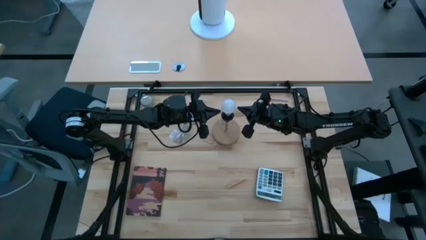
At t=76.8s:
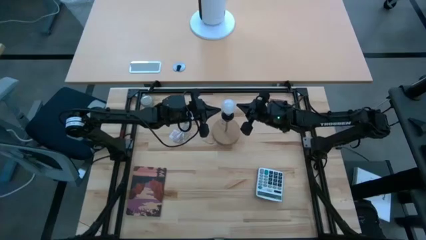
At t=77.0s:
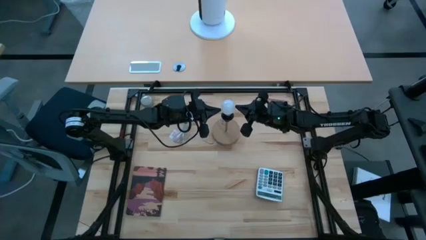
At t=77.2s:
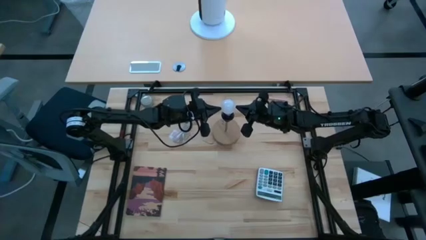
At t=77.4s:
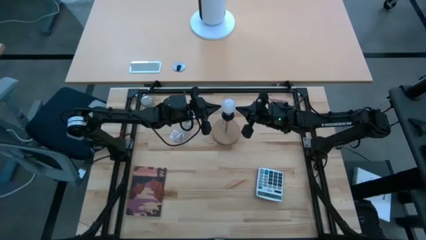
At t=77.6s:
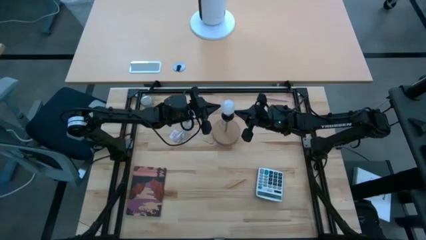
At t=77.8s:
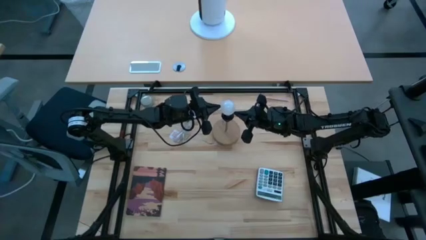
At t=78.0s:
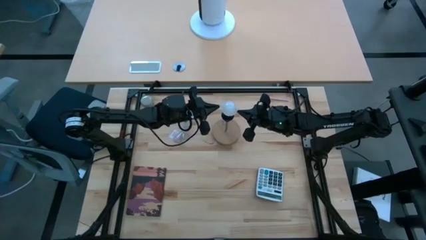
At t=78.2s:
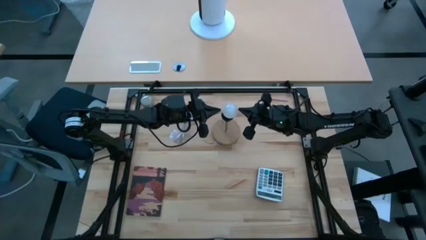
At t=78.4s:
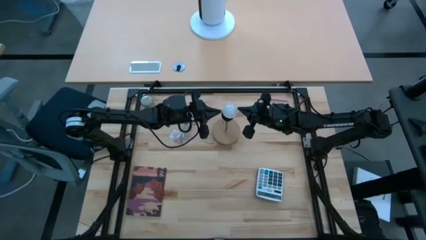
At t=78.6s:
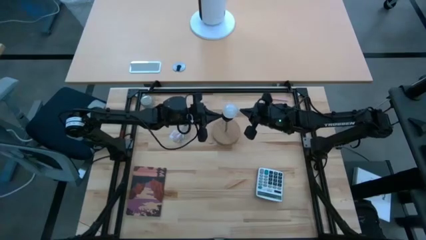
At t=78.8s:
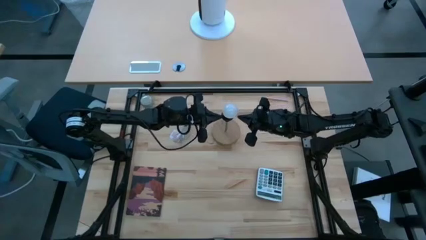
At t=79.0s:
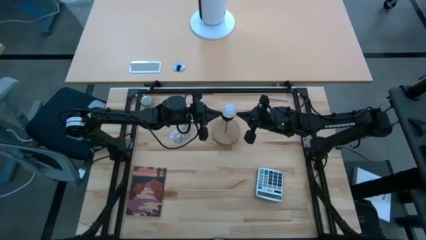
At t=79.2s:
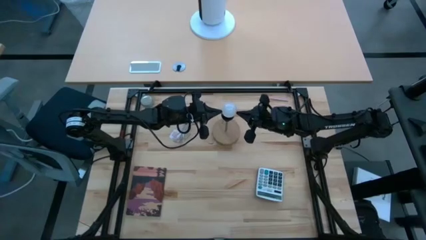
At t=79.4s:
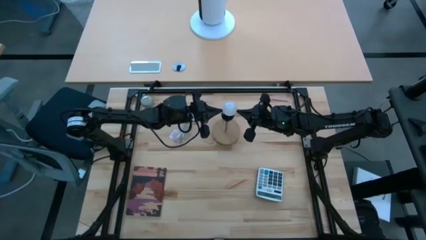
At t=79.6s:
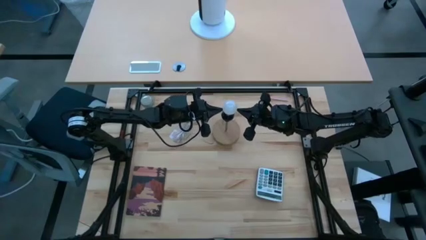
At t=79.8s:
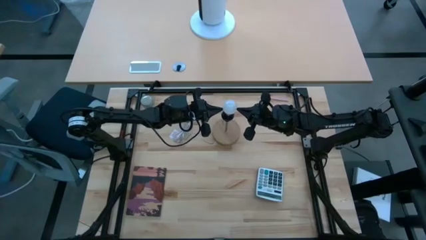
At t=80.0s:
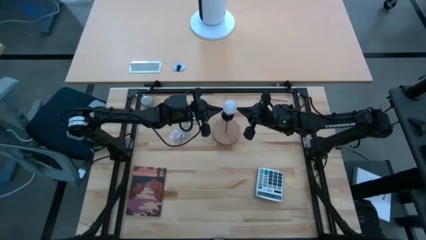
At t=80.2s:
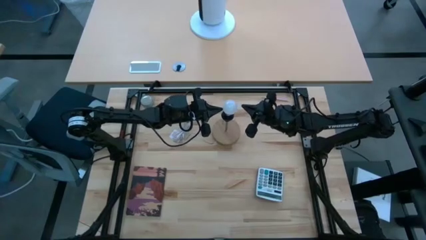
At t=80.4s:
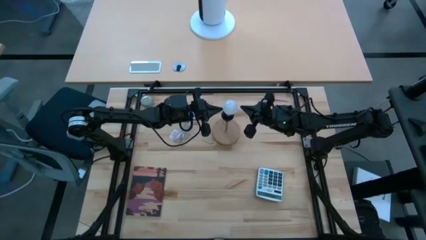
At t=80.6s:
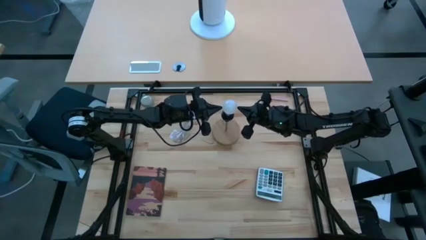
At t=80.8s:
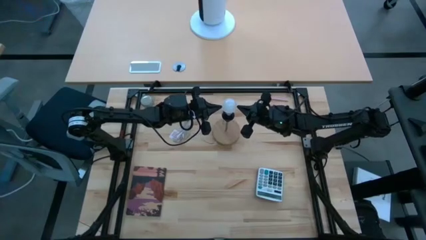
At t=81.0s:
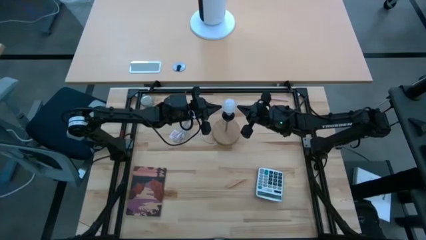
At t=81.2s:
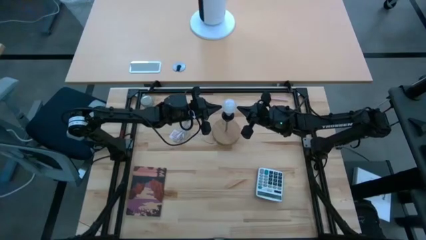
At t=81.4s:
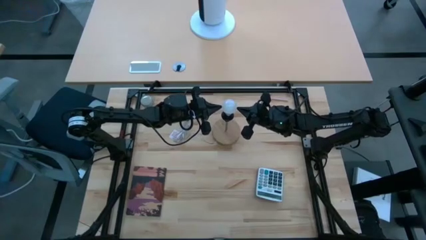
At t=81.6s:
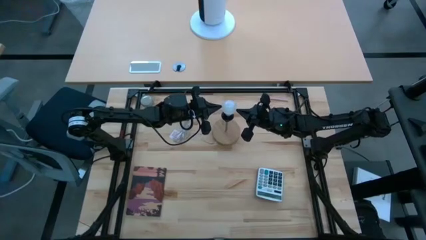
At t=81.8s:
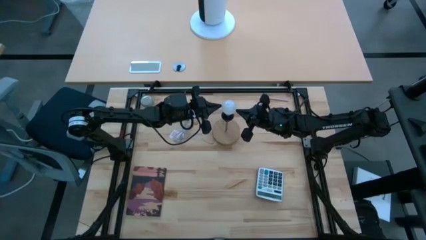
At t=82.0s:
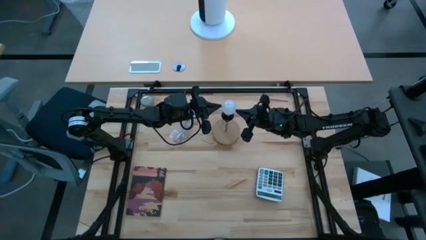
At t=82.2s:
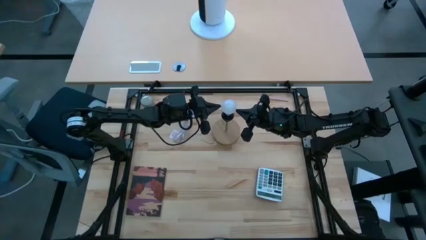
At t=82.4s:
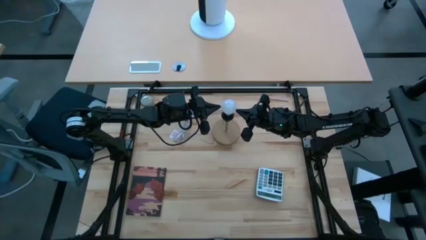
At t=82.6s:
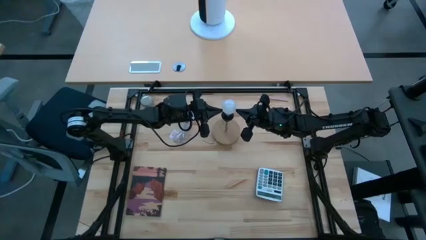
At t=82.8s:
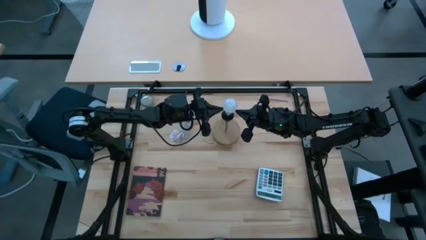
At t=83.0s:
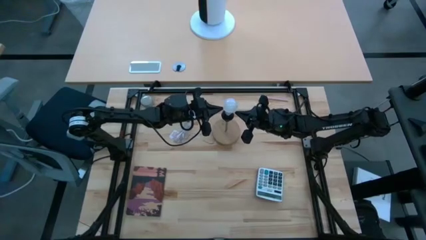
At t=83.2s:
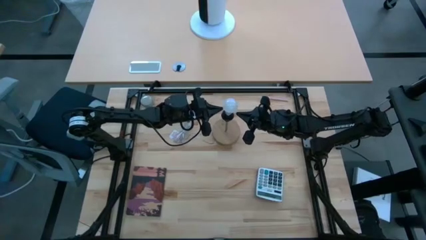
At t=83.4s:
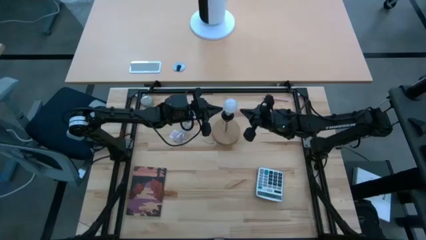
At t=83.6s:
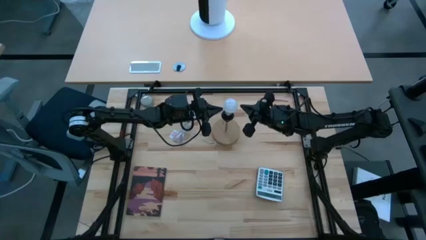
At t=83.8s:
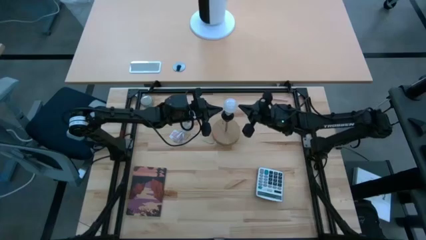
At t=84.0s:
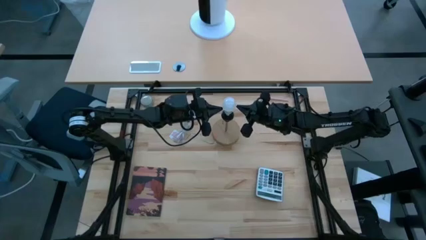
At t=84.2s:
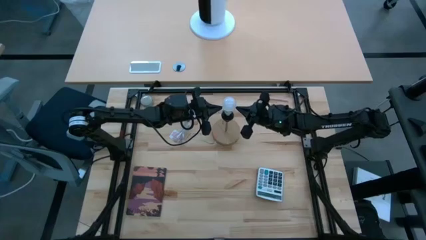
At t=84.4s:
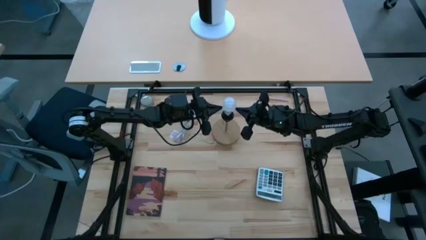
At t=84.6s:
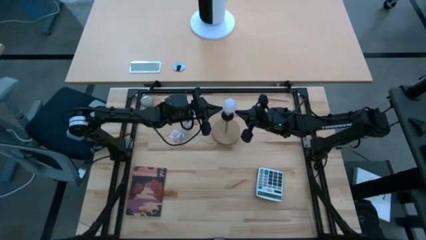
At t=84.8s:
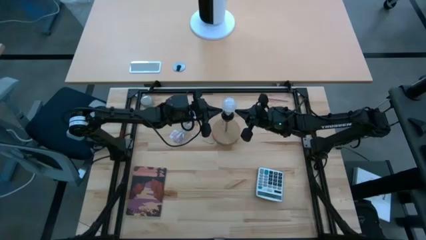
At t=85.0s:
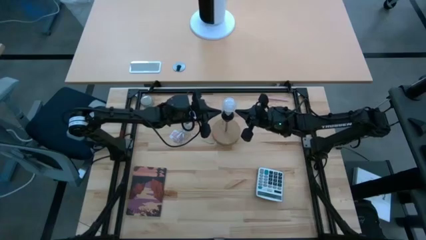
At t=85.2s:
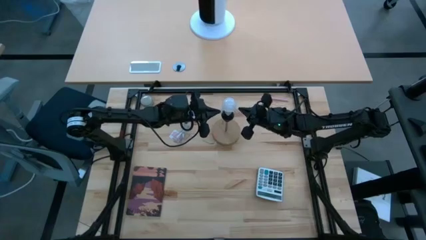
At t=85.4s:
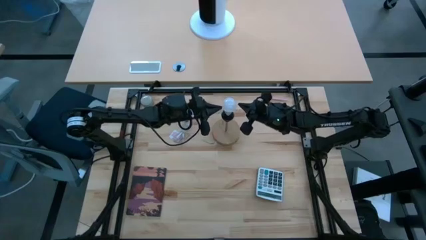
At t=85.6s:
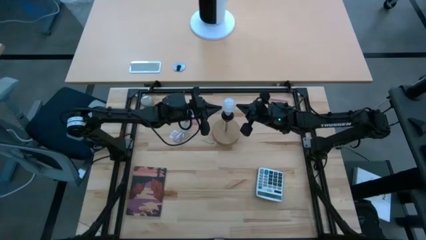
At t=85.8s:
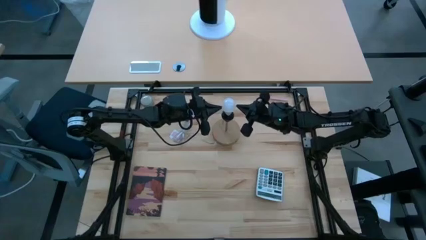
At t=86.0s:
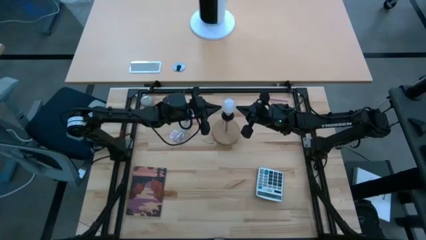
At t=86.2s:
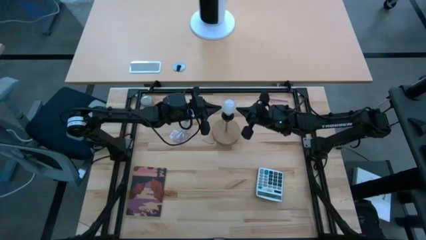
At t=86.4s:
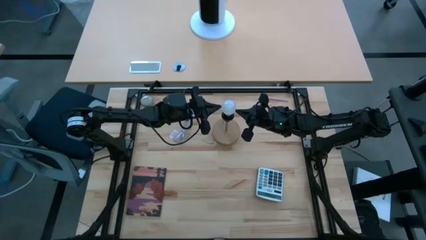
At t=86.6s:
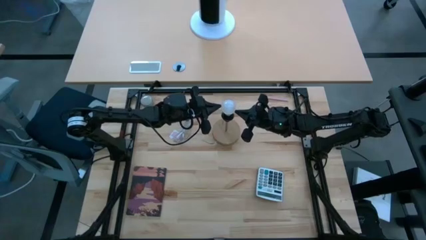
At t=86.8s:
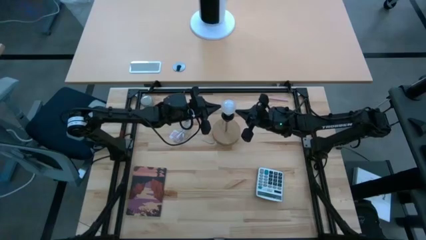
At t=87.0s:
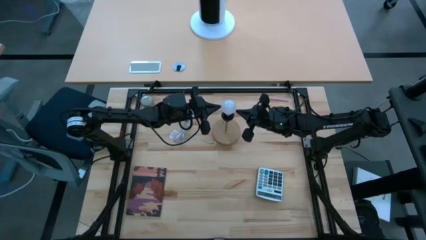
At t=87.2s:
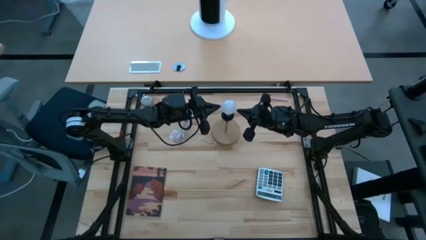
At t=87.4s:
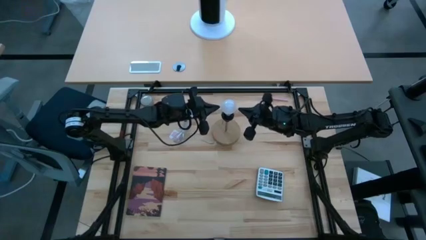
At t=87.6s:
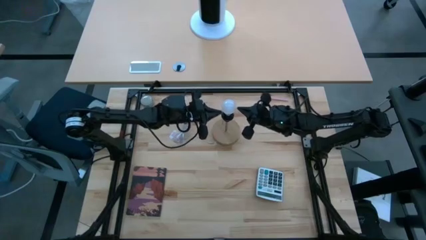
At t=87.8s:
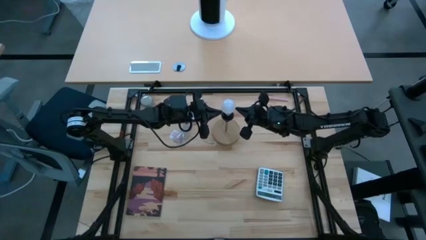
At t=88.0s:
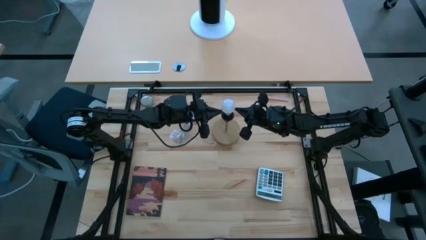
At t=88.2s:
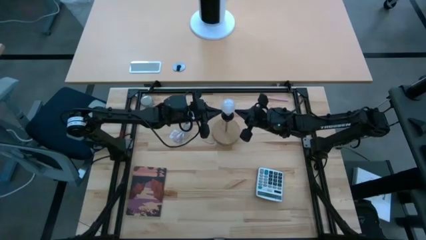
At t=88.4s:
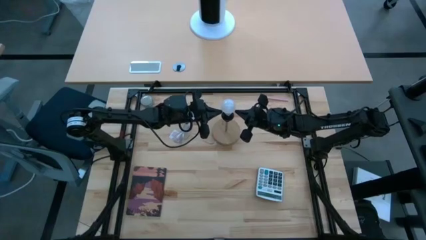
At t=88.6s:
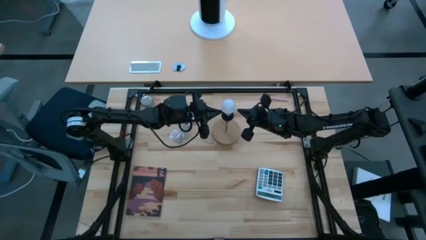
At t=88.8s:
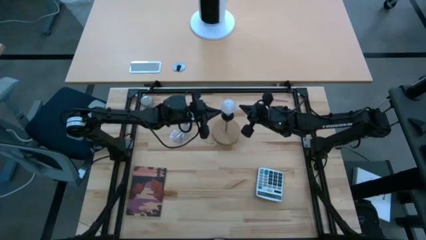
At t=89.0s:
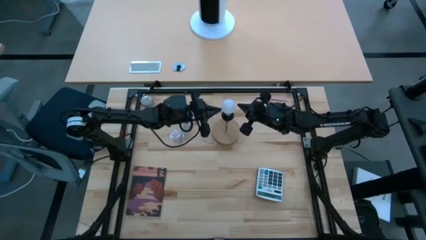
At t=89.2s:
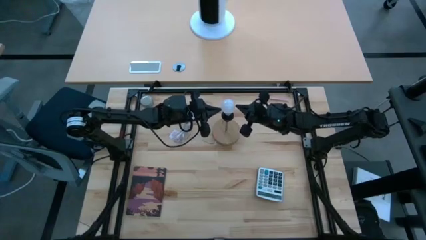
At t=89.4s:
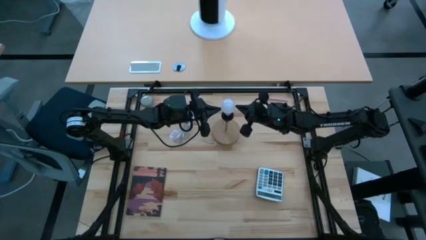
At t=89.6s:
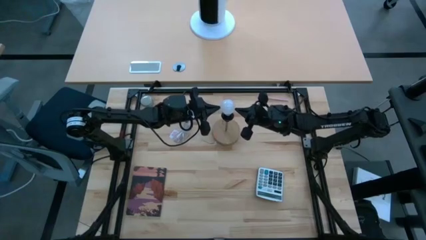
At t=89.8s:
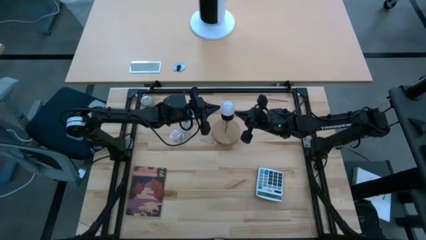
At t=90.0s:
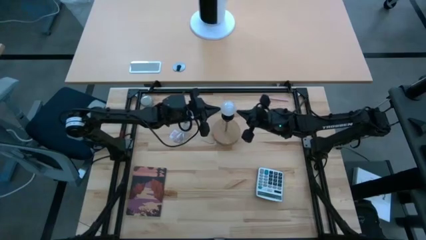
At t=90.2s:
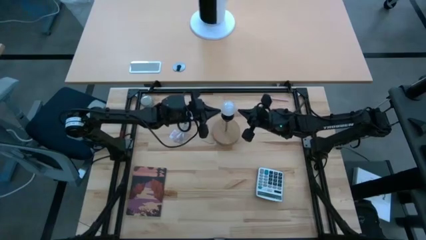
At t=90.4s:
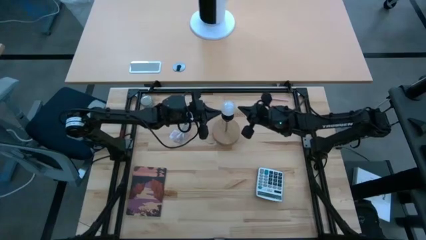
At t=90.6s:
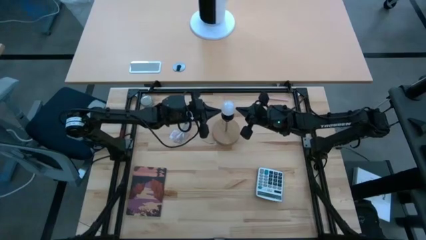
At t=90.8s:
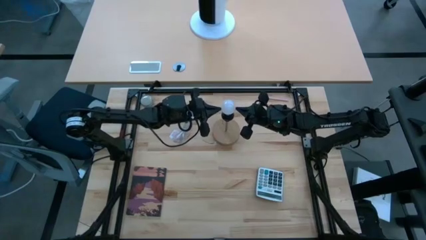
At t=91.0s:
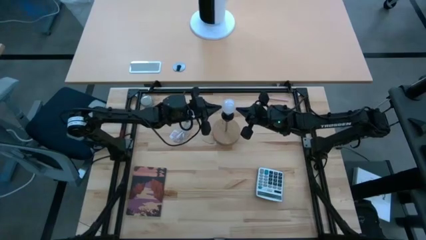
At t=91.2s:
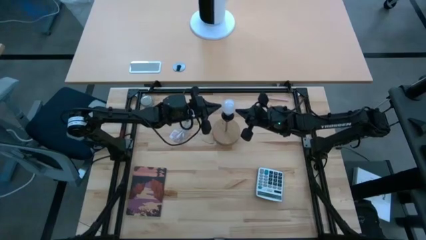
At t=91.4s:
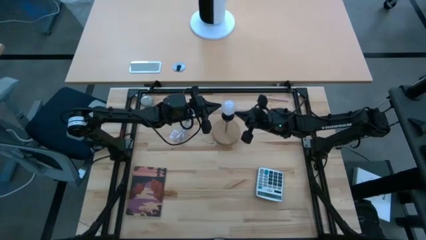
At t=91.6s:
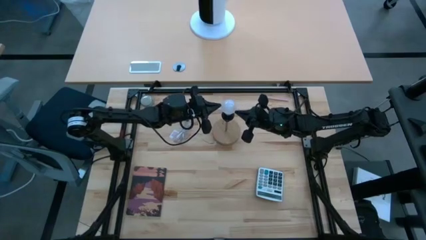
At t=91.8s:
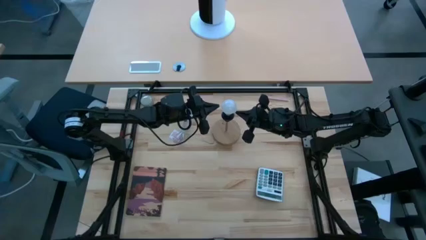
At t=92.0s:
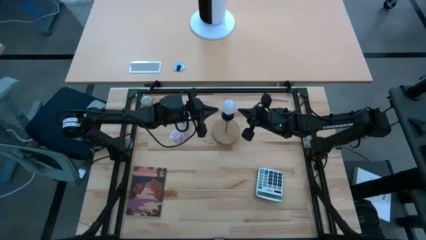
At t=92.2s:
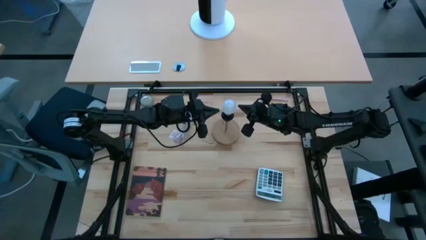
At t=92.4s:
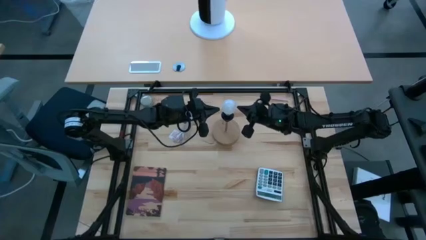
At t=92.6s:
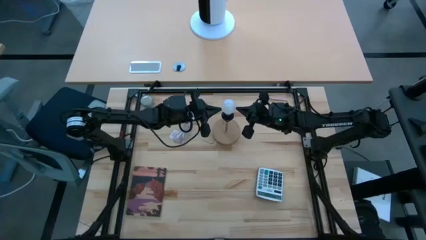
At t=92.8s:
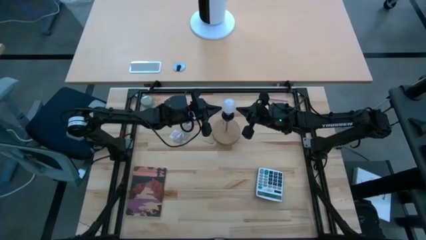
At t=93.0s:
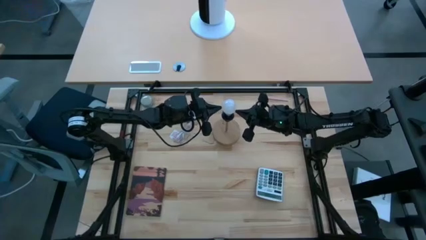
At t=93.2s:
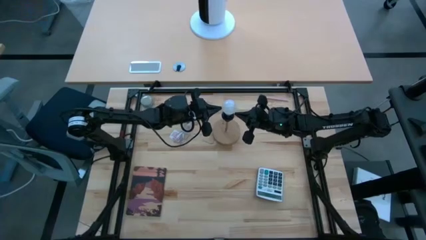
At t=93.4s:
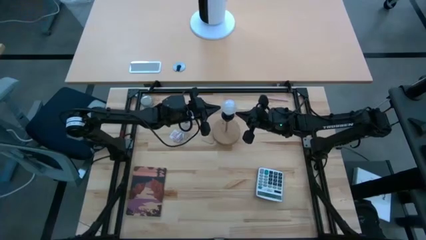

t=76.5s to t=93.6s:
Task: Screw lightbulb
Insert the lightbulb into the lamp
